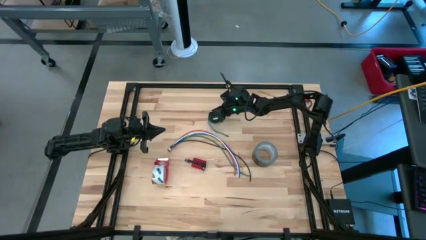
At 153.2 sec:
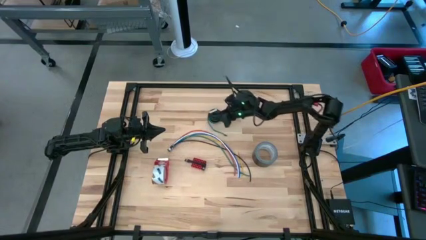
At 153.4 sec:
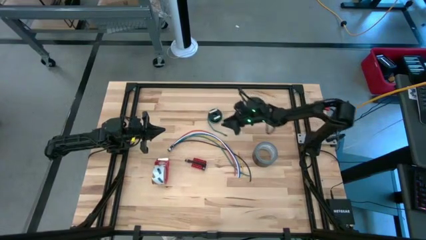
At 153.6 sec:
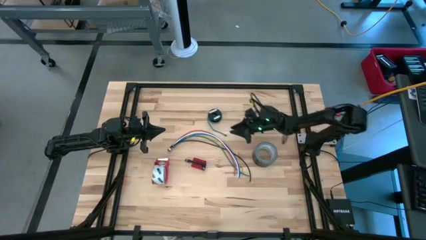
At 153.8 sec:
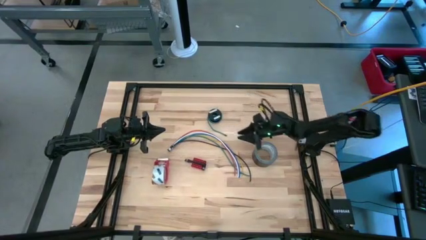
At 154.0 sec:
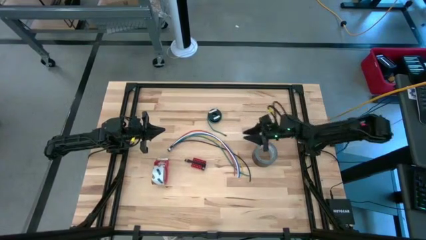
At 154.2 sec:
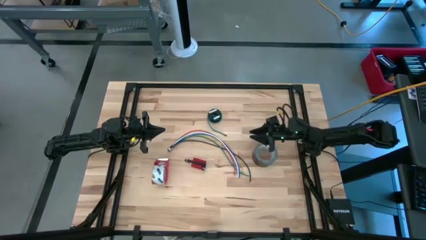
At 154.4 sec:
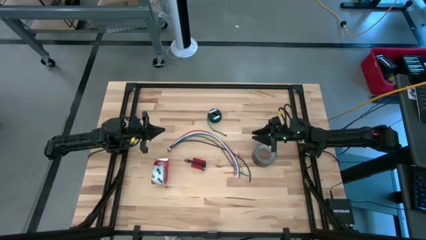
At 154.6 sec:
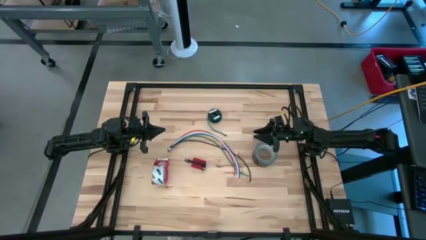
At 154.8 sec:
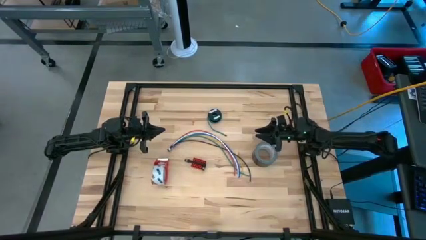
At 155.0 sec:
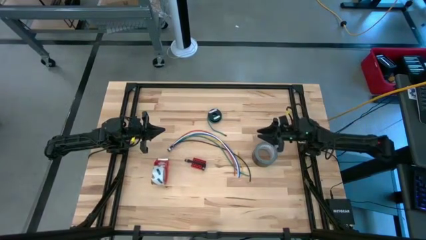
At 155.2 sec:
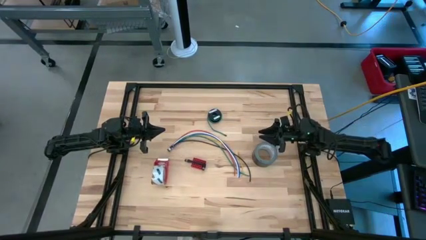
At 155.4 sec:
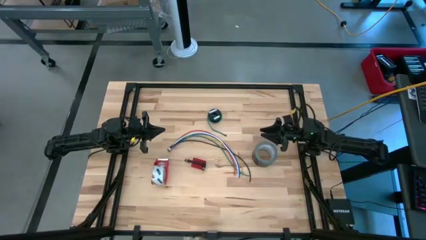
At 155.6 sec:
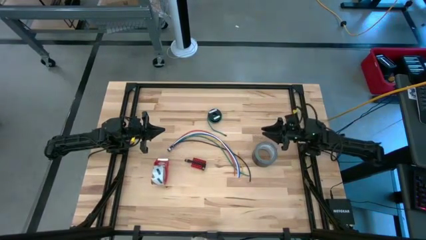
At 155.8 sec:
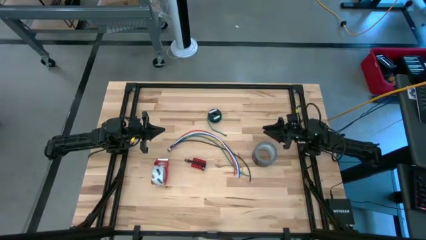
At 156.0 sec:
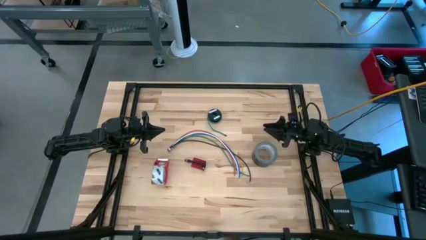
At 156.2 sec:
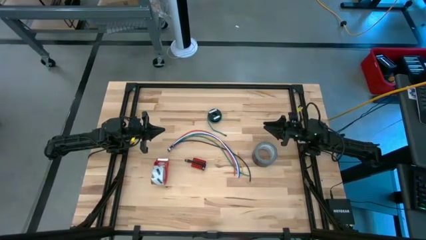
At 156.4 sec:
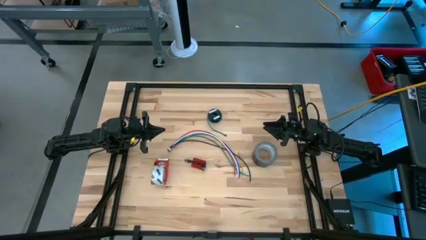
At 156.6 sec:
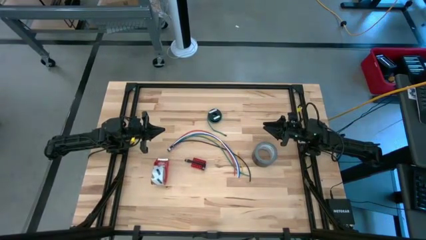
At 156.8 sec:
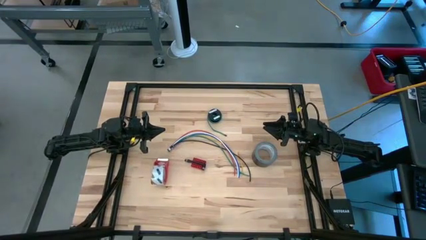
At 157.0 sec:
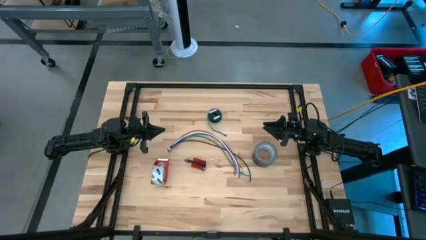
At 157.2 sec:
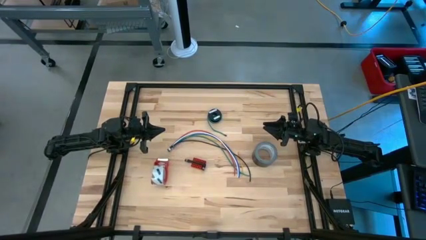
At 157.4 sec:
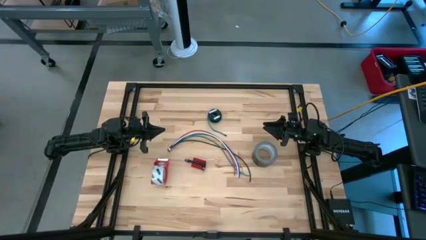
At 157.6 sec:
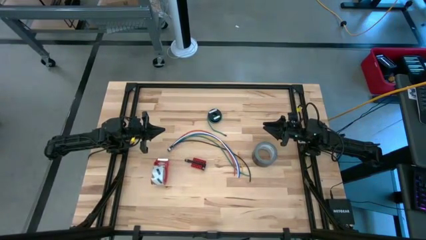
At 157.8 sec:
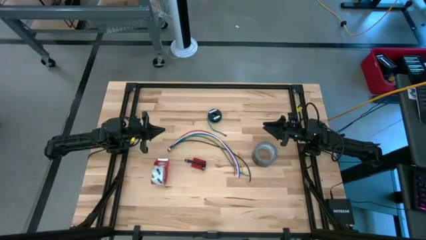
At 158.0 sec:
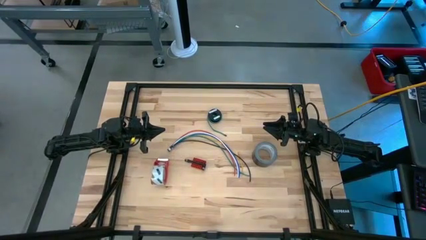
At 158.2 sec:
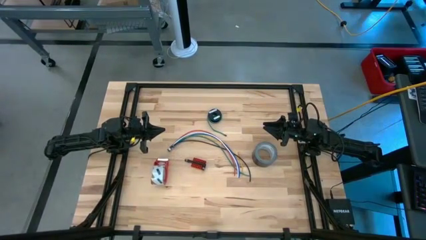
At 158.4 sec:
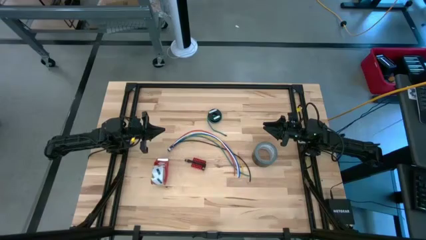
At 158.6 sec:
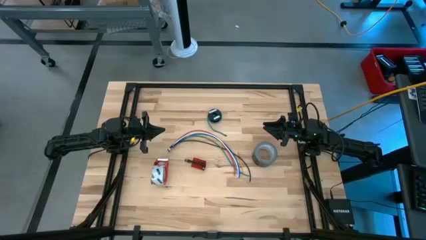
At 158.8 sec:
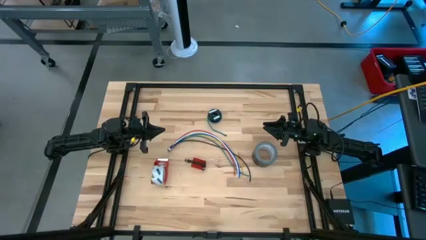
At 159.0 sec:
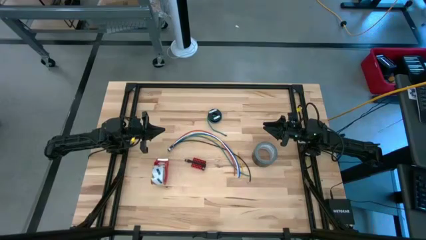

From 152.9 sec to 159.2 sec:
Task: Coil cords
Return to Home Position

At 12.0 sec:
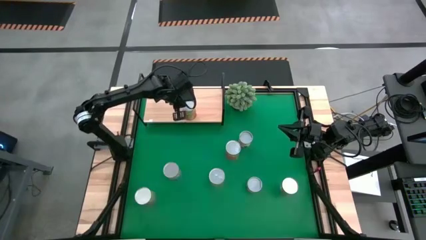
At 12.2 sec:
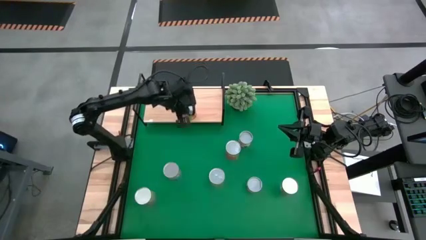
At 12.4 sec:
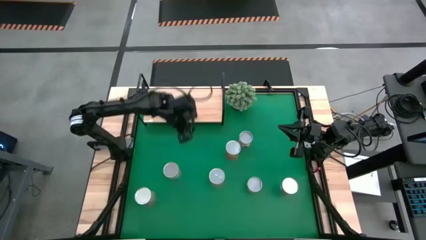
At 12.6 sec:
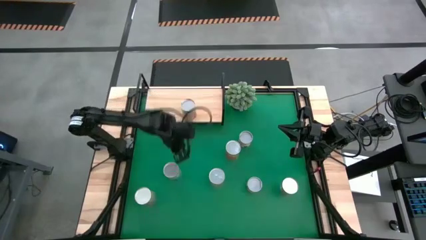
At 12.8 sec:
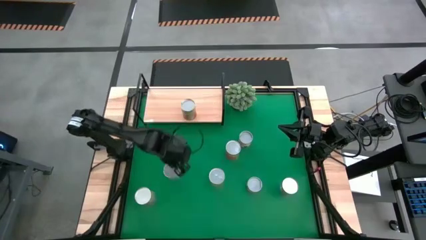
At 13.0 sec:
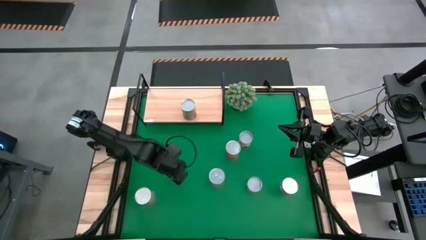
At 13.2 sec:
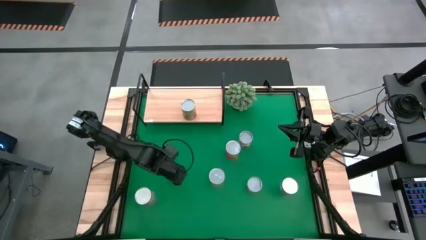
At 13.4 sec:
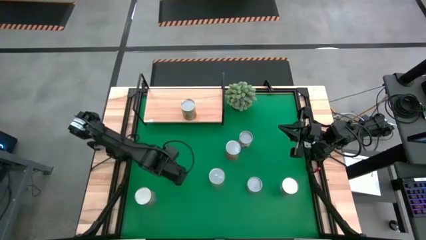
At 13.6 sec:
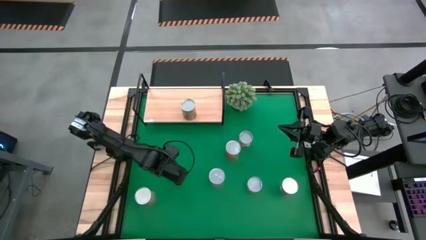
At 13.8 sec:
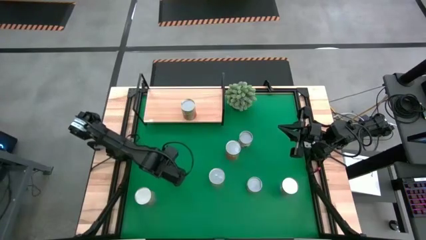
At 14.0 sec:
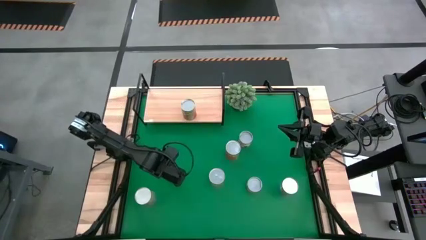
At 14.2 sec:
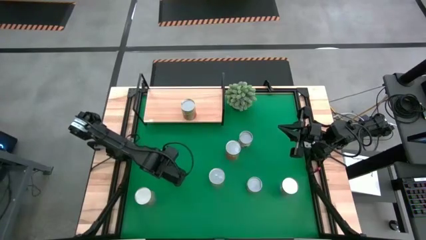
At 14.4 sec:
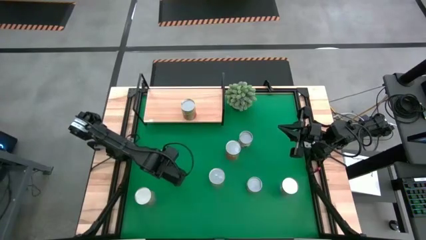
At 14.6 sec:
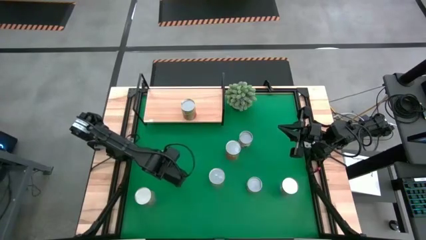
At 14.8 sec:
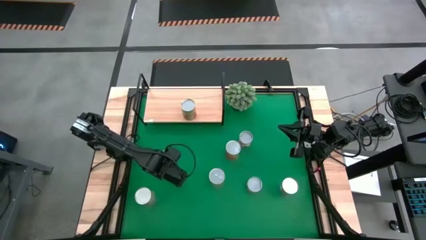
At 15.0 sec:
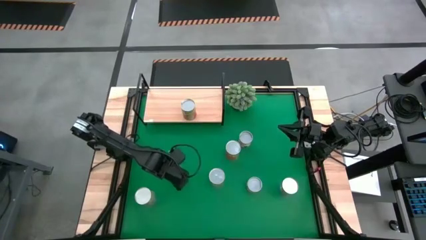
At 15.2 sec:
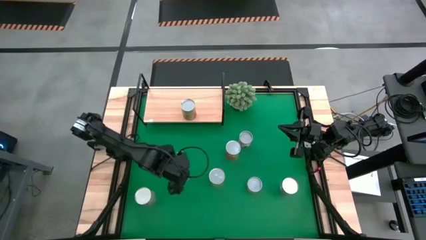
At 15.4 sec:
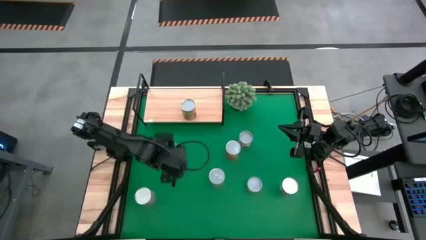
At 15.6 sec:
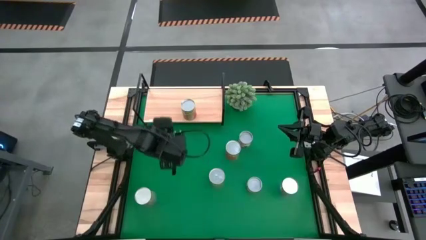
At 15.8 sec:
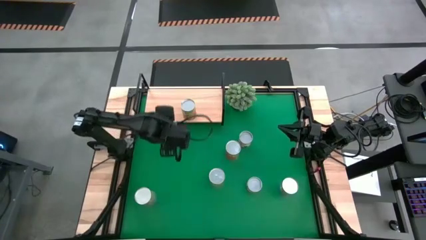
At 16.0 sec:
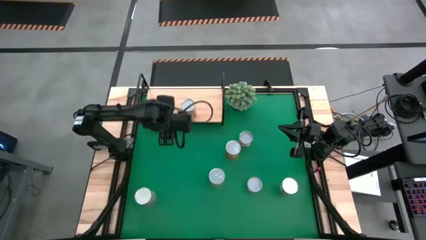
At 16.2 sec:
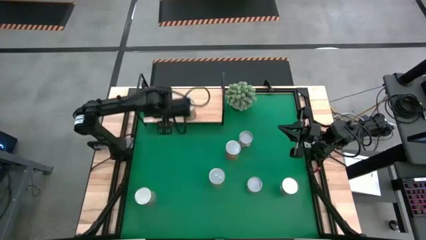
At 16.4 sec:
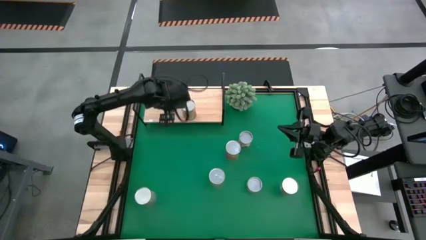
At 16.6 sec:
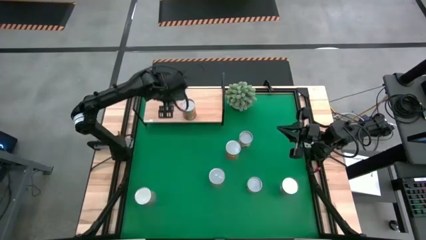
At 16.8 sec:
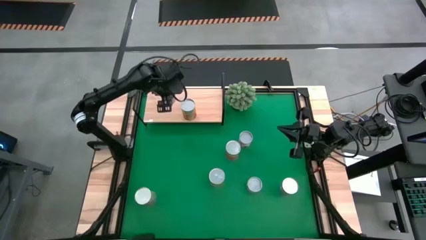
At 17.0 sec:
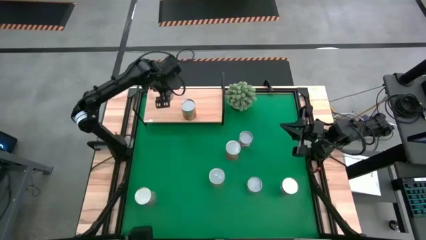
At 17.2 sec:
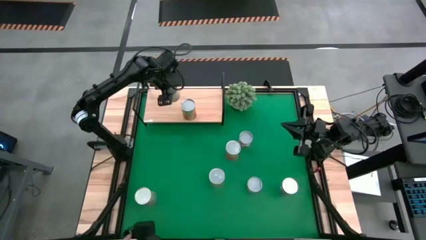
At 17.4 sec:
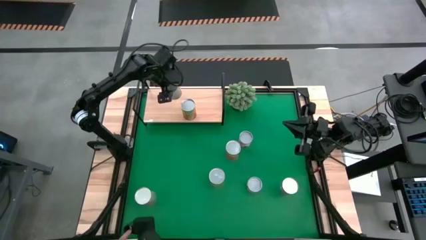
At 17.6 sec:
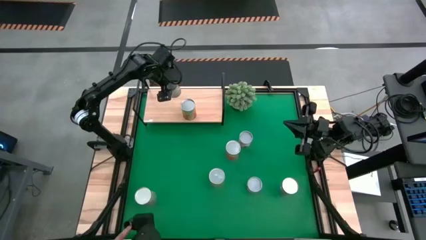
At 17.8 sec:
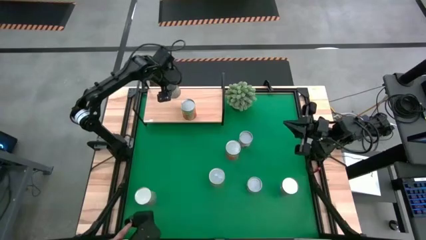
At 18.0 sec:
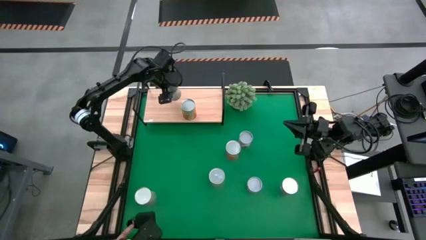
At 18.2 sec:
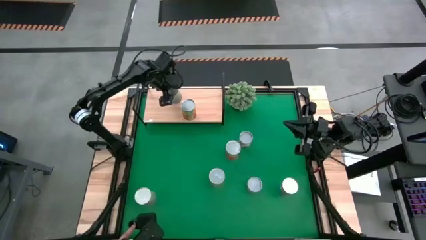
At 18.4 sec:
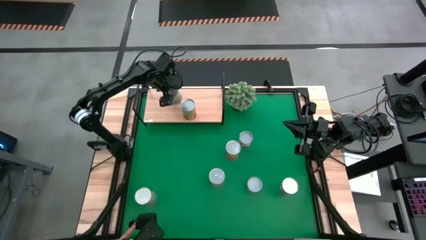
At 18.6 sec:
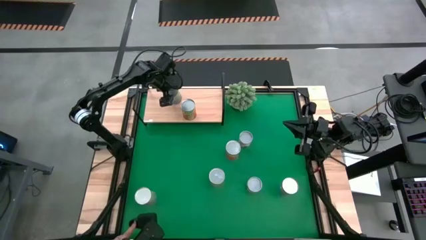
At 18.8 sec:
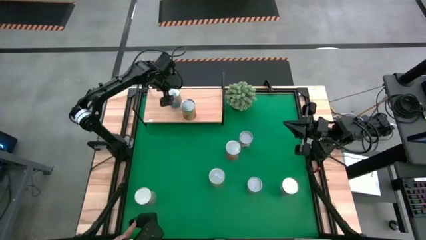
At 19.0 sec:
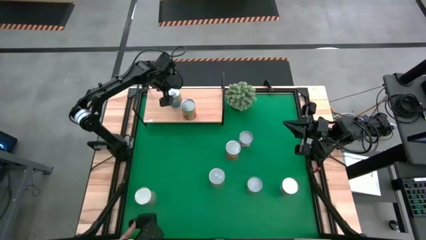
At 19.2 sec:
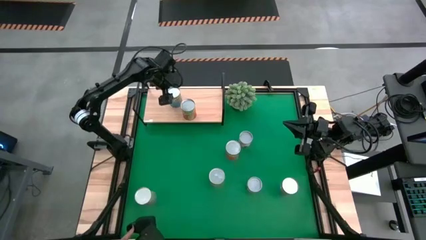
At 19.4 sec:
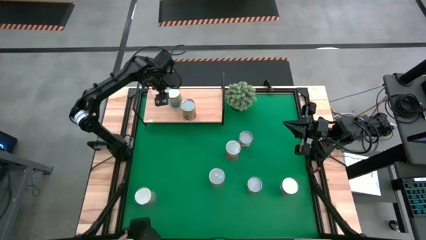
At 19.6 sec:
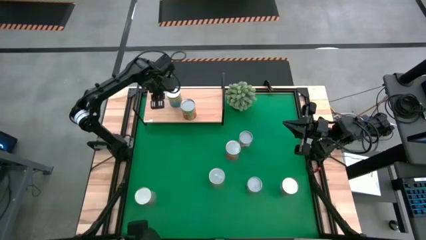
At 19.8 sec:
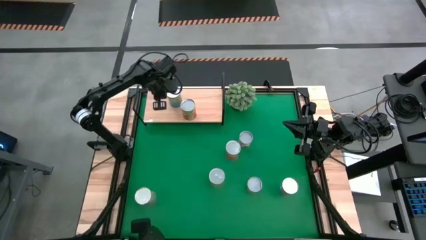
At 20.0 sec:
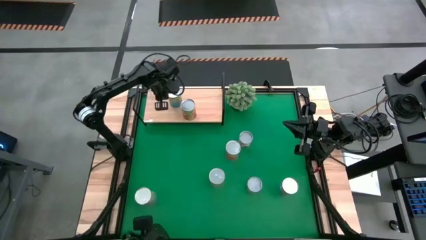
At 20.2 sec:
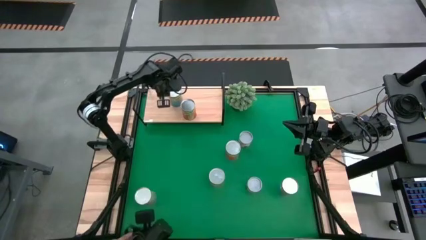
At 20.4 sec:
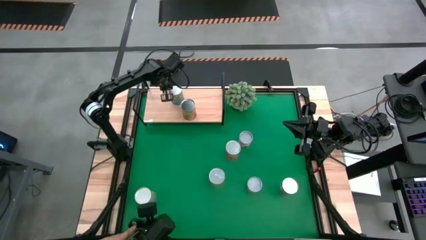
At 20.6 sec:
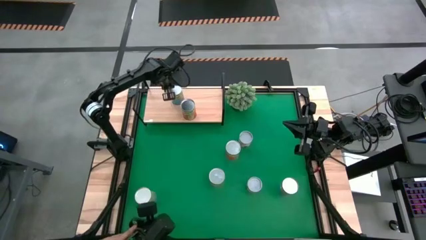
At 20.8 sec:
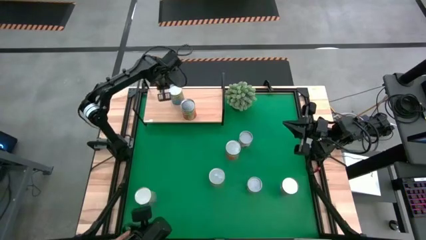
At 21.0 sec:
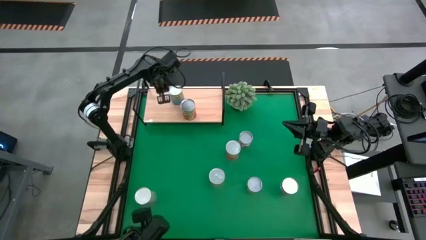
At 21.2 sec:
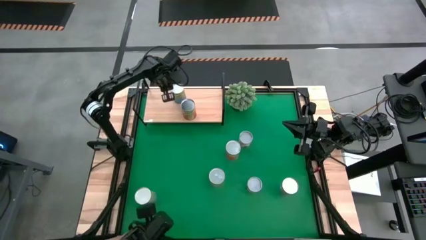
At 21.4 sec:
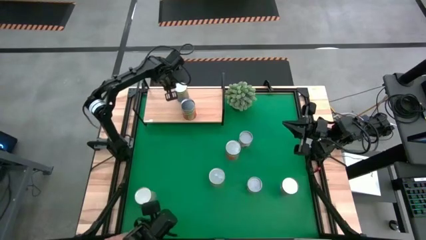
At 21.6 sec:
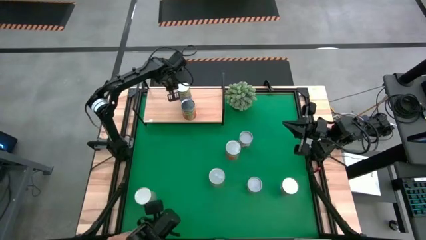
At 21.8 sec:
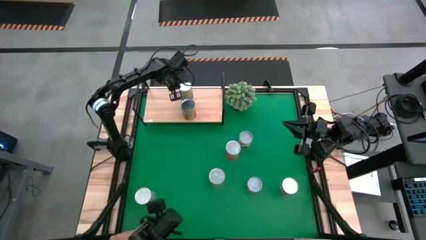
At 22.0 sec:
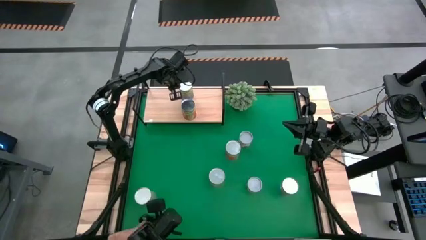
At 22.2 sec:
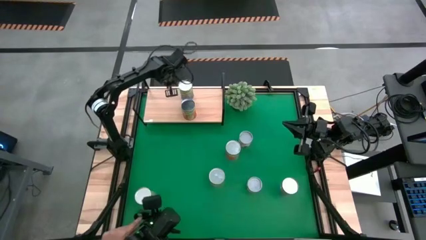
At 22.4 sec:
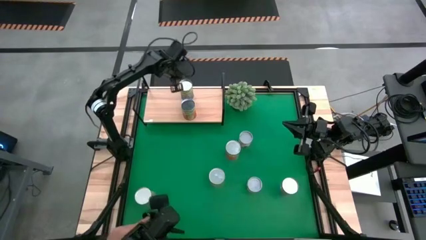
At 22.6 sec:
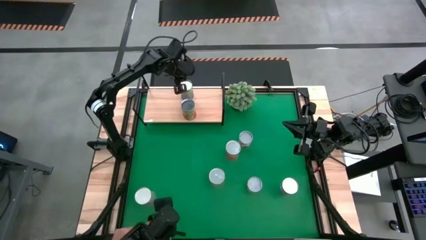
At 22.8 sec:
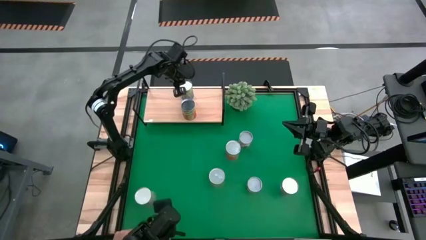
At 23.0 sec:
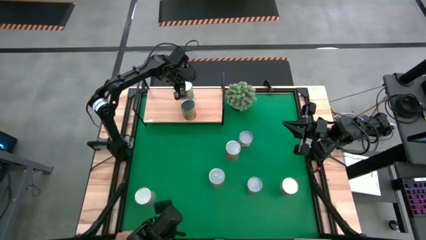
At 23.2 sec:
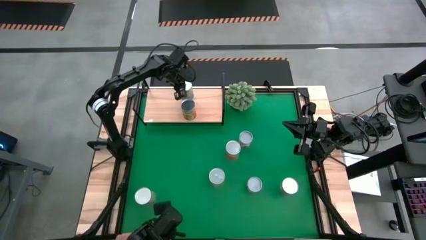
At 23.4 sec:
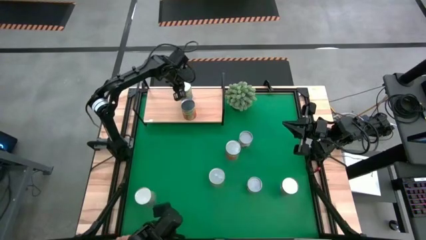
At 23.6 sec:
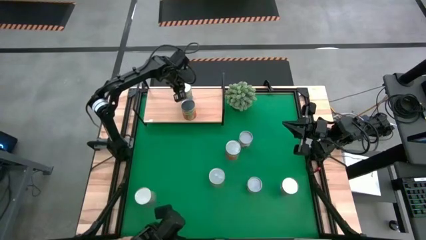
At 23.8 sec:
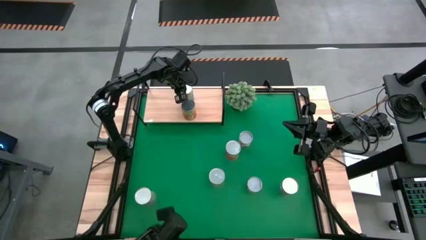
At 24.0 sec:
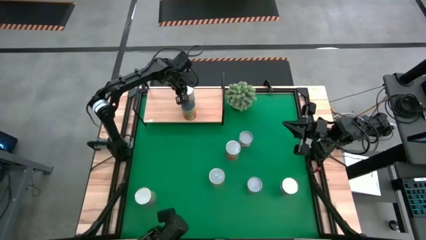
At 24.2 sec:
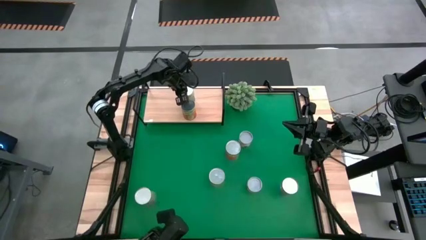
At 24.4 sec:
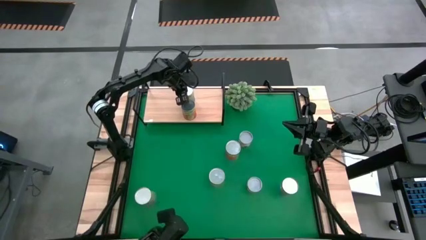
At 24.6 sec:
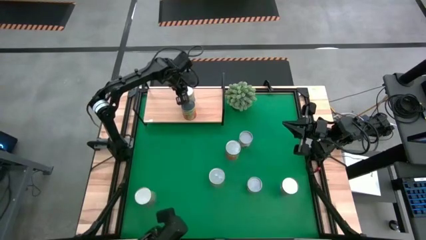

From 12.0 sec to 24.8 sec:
Task: Pick and place cans onto a shelf
Put the left canned cherries on the shelf
